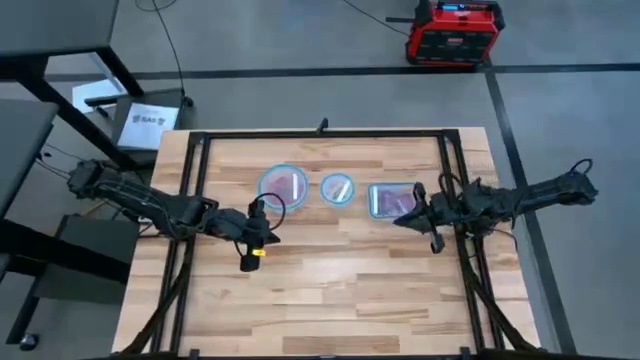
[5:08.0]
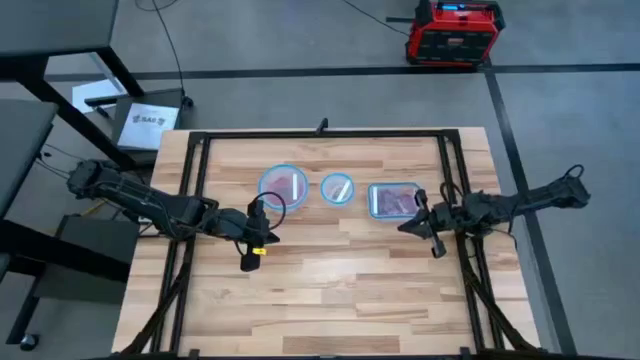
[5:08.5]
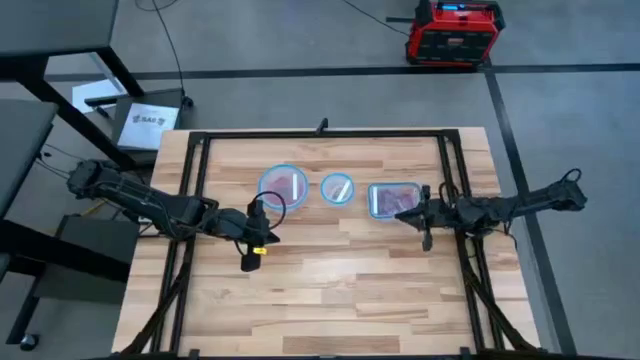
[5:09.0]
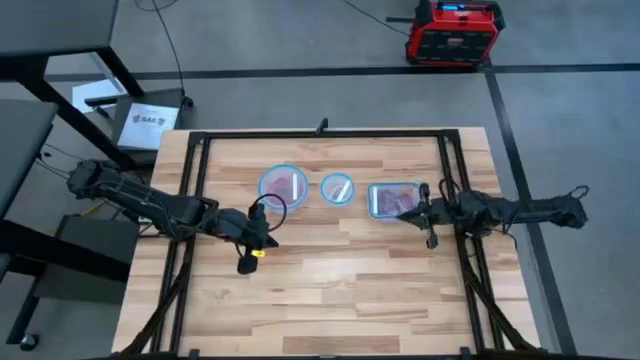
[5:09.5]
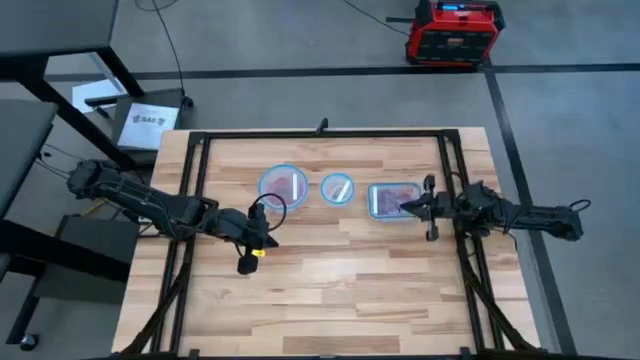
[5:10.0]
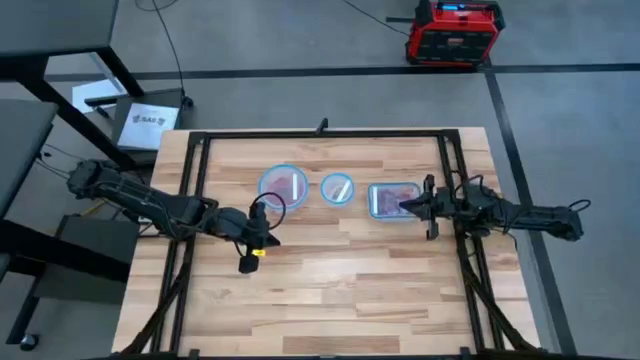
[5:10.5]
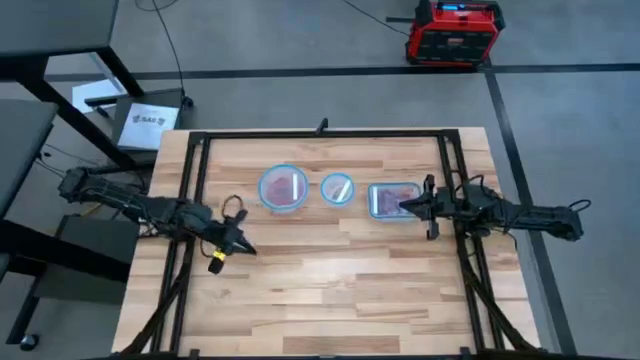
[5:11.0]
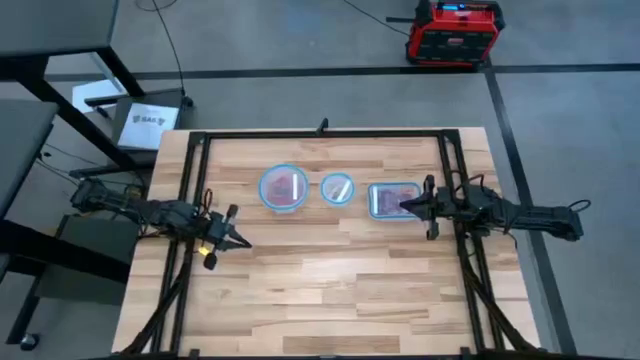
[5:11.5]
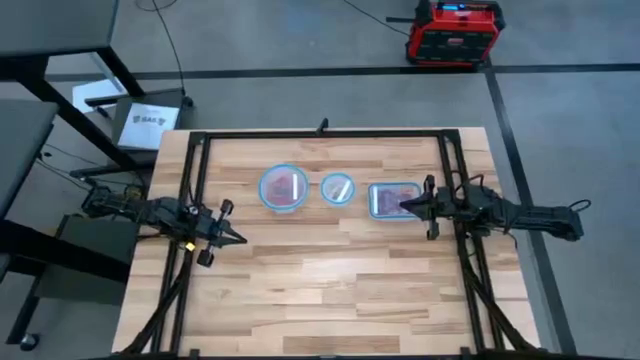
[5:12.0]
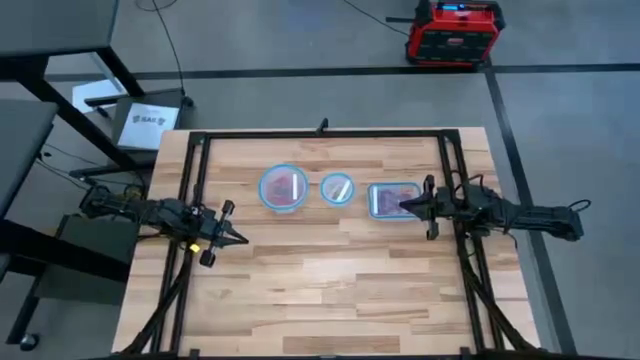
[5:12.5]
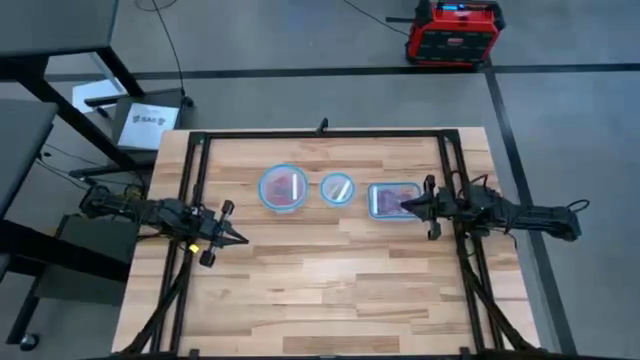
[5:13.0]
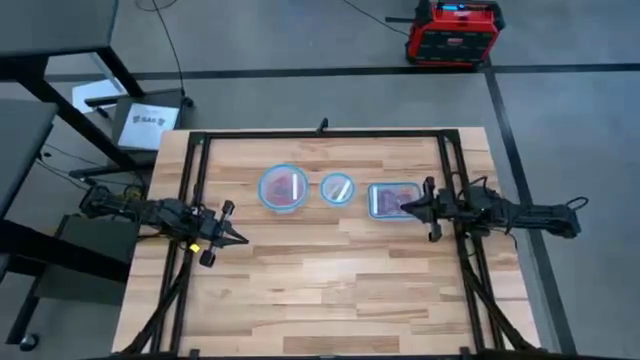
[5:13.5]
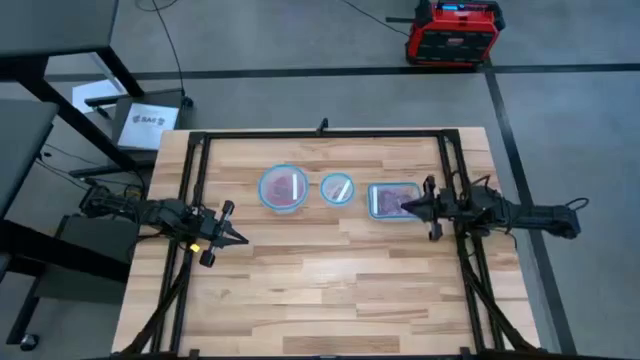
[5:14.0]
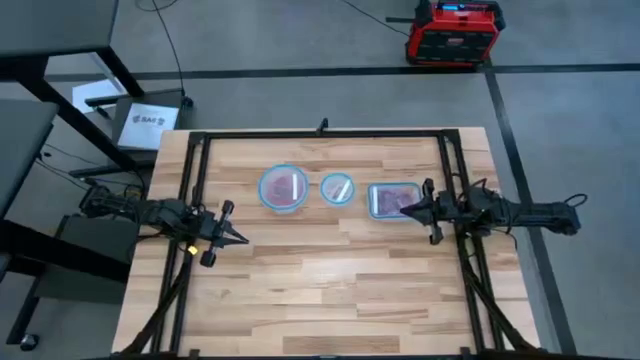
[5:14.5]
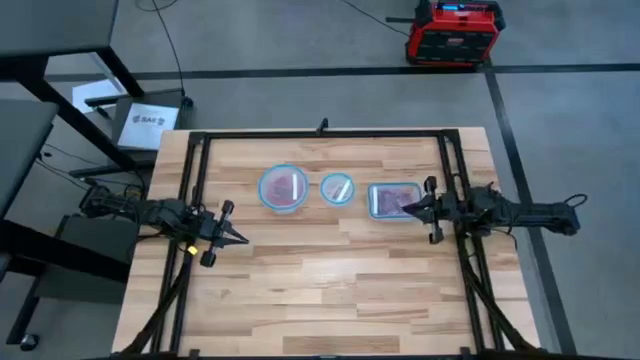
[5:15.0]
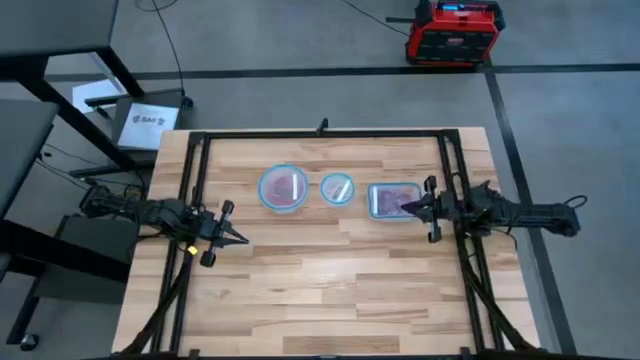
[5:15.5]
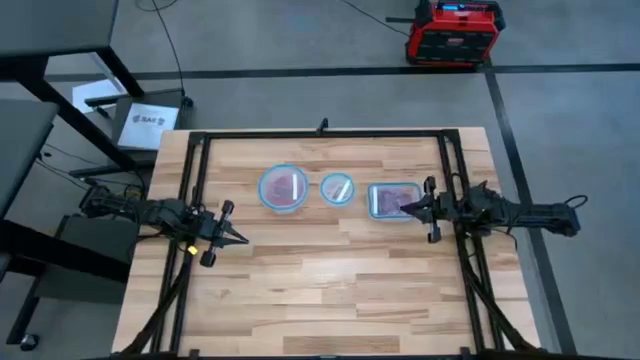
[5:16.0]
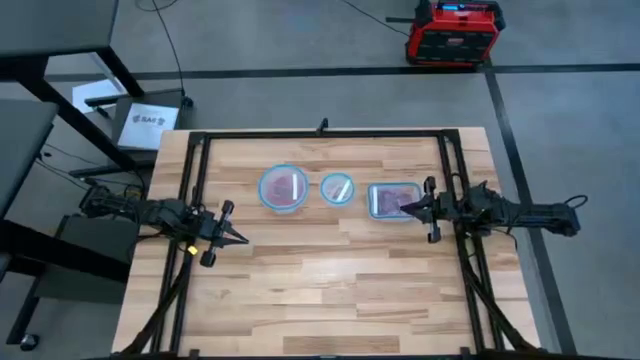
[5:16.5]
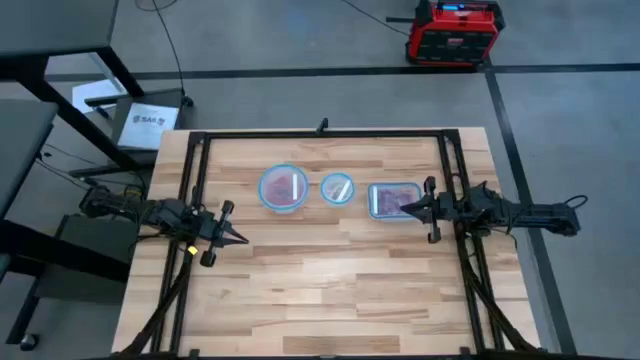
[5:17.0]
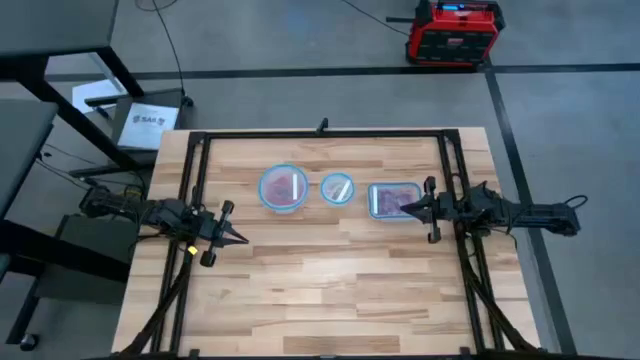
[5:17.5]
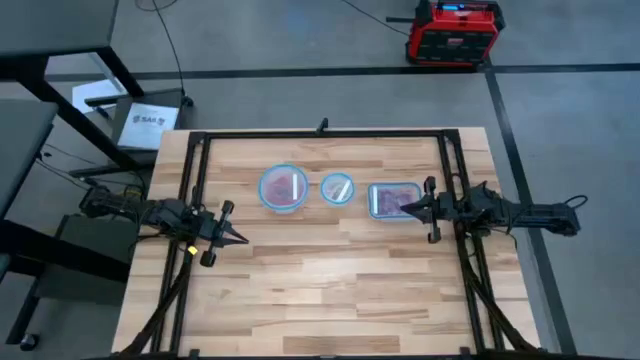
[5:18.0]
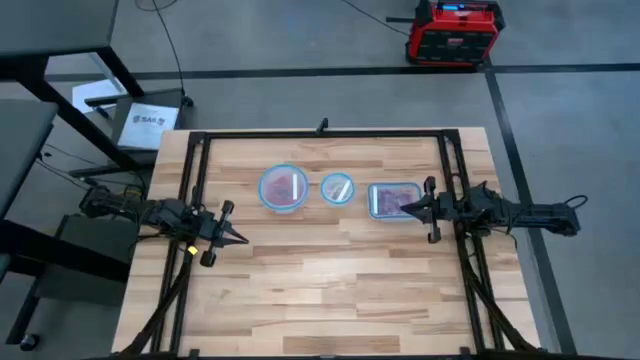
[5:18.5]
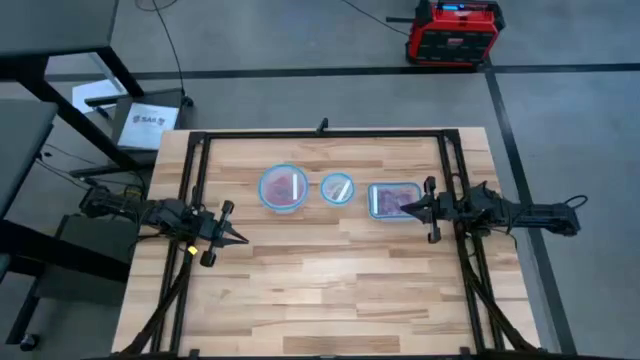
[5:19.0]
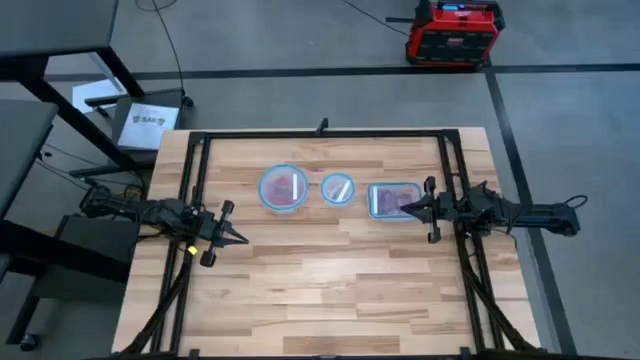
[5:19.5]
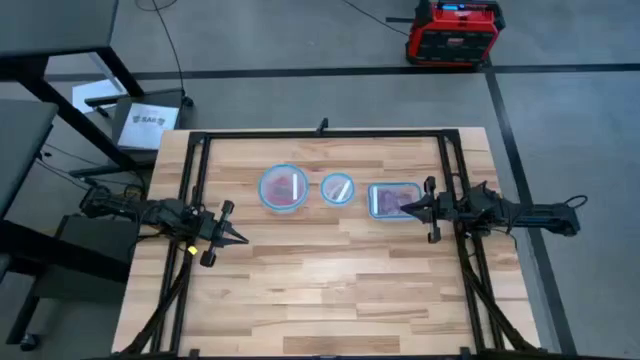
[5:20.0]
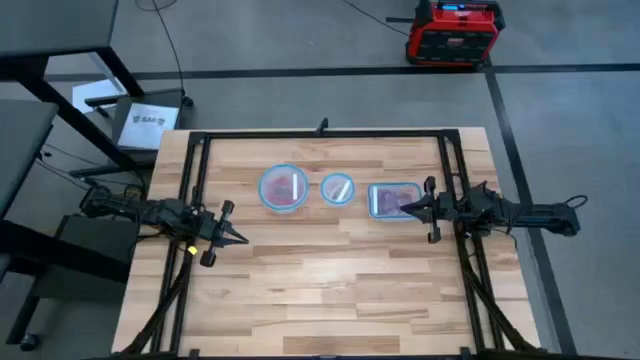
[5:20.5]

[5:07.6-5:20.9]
Task: Sort candy
Return to Home Position

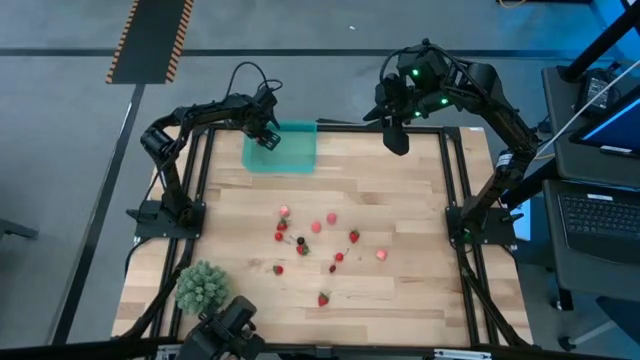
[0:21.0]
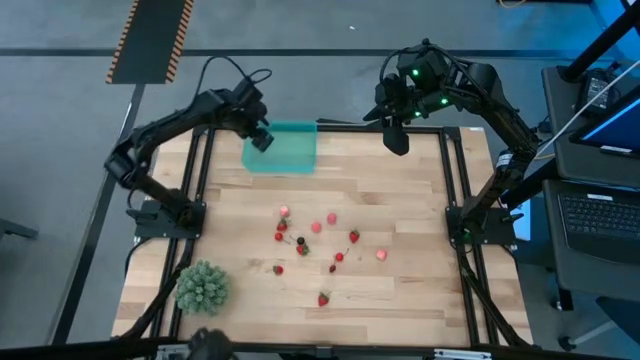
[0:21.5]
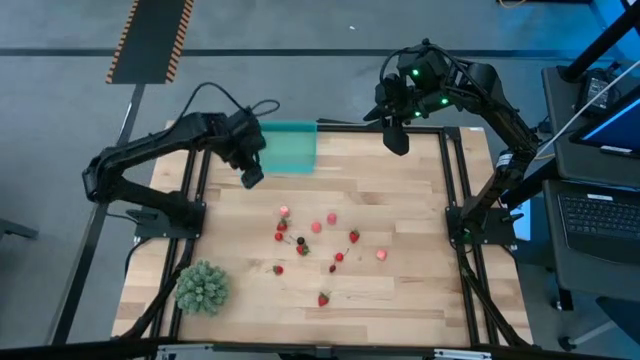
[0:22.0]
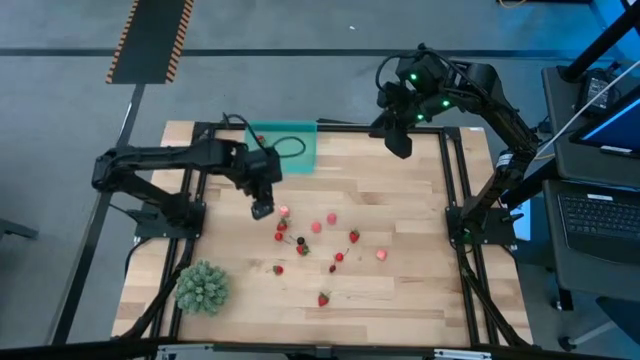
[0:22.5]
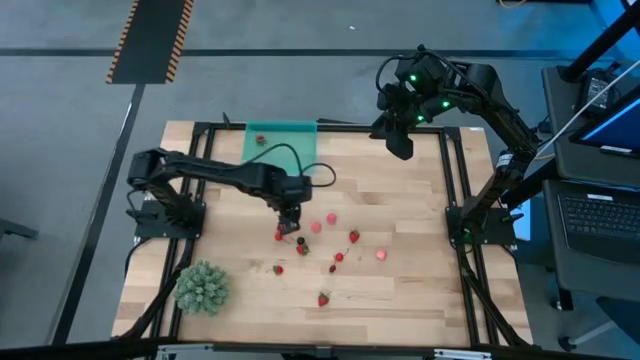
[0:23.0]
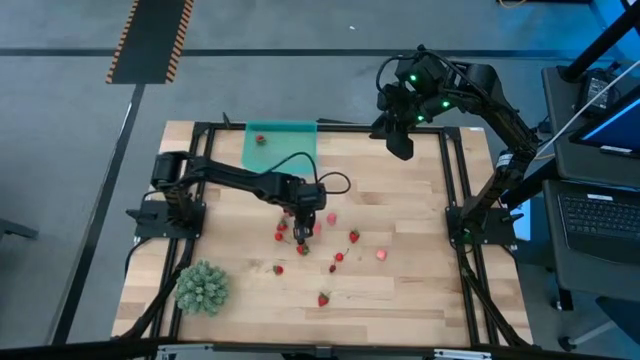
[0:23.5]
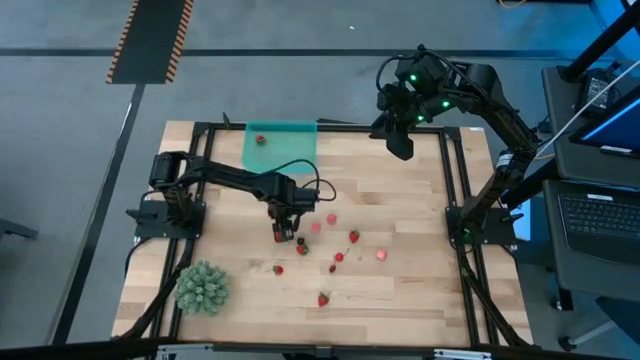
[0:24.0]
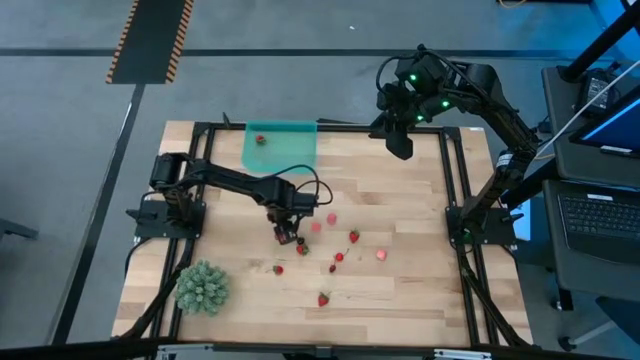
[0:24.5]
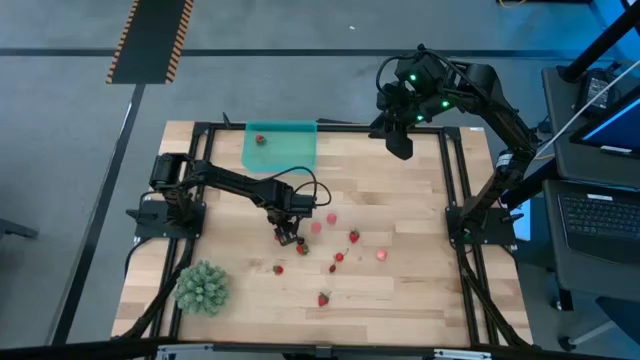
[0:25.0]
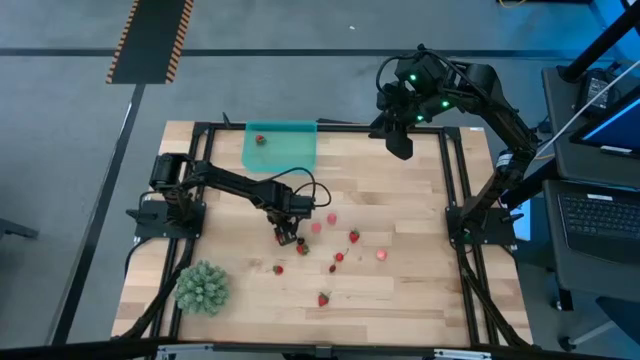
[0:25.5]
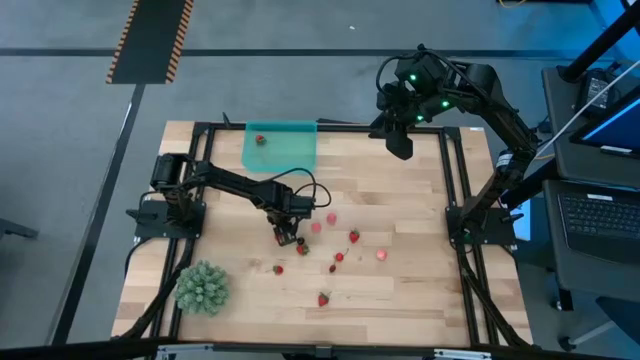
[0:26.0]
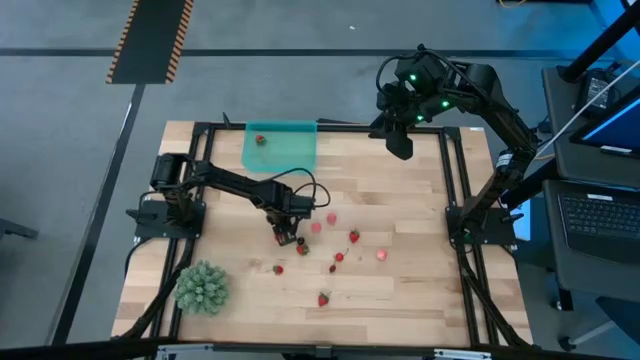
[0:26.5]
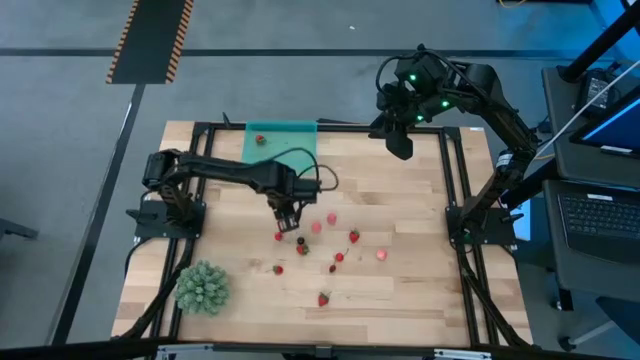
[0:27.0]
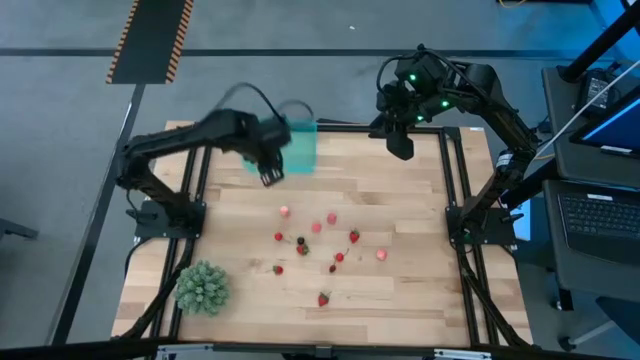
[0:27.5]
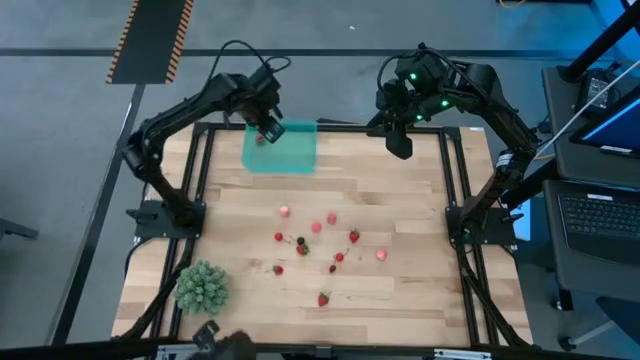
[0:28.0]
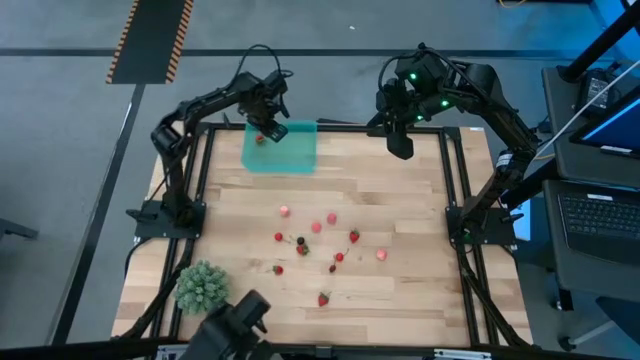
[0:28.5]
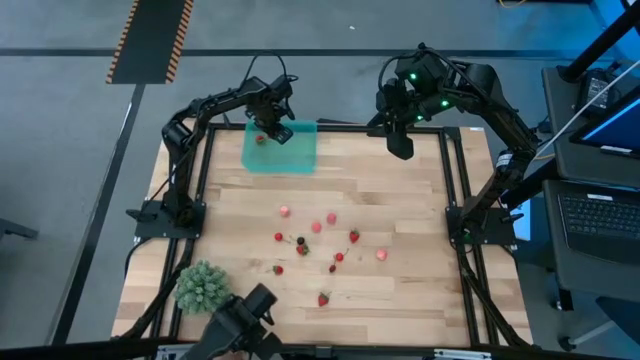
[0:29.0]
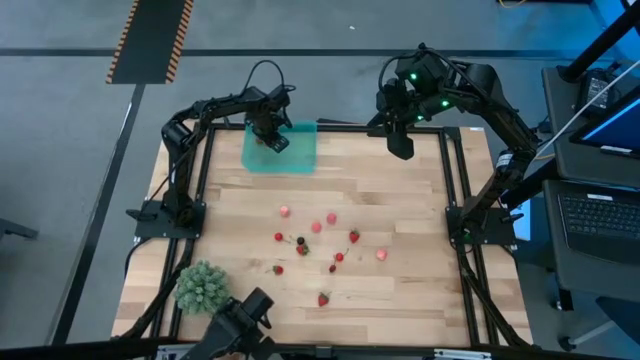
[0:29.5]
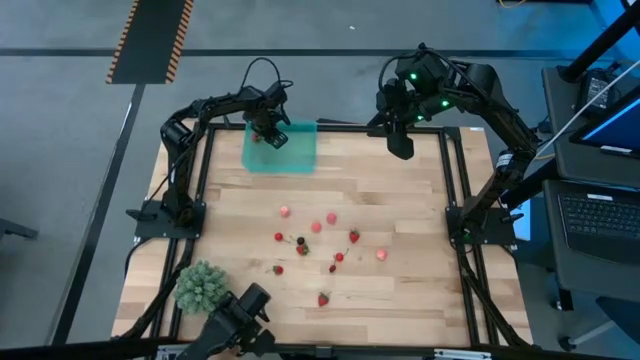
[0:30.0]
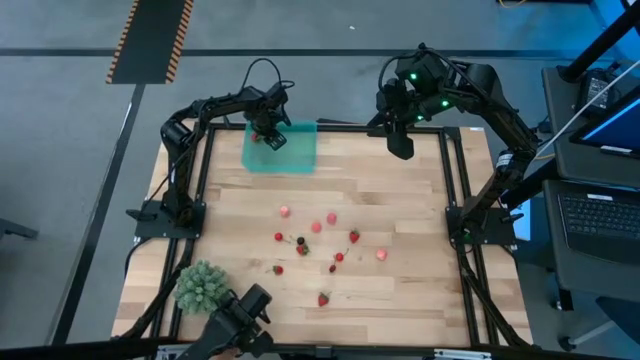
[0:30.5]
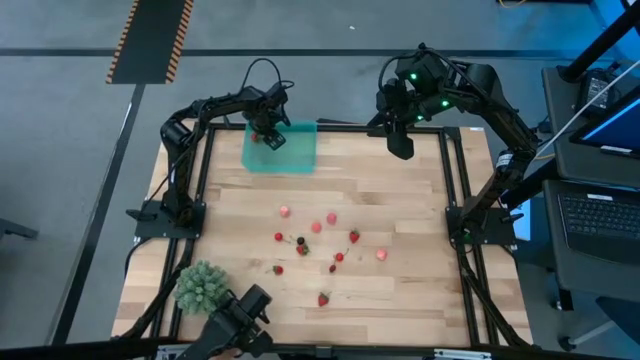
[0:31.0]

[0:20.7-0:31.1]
Task: Pick and placing Produce into tupperware
Put the red strawberry into the blue bin
